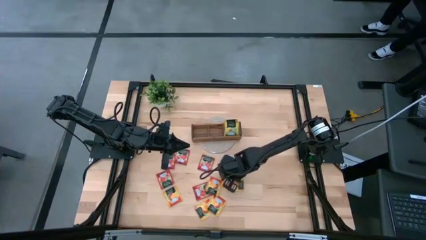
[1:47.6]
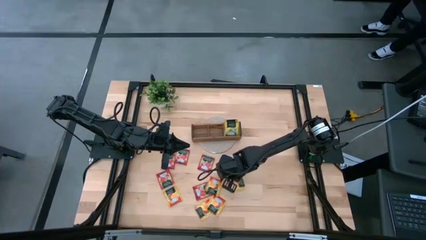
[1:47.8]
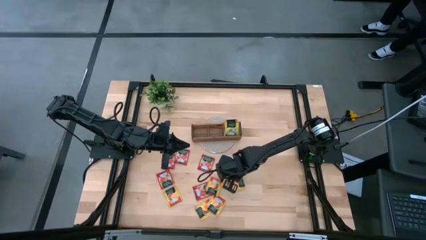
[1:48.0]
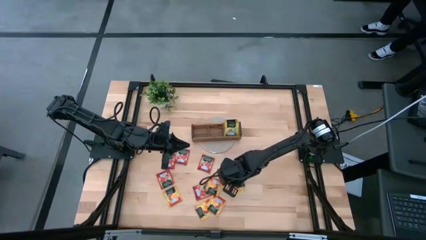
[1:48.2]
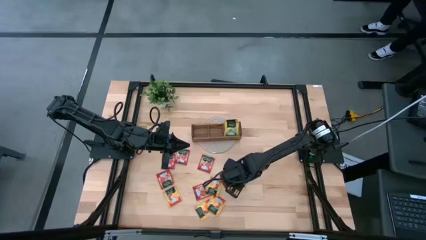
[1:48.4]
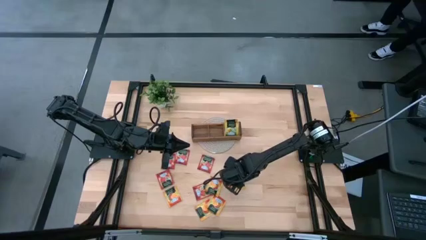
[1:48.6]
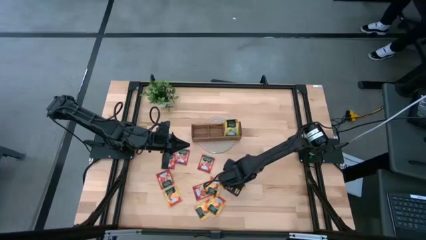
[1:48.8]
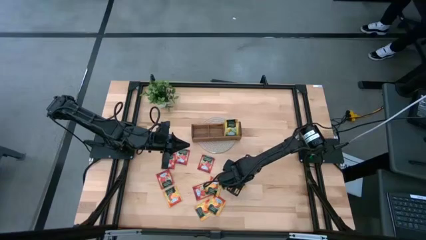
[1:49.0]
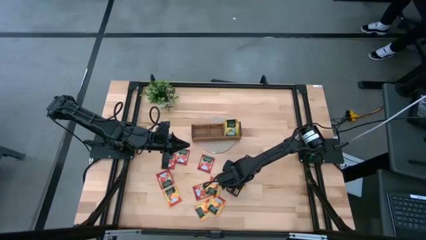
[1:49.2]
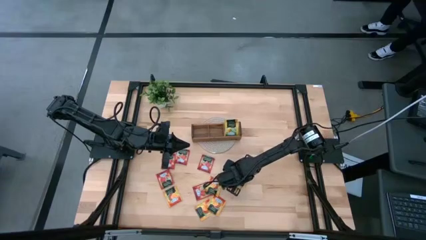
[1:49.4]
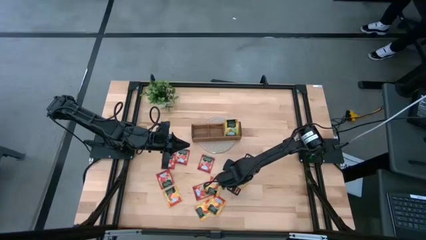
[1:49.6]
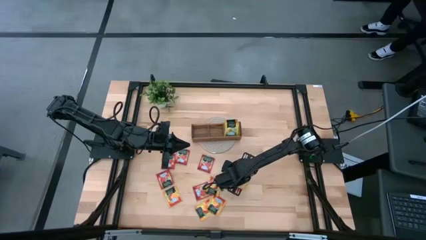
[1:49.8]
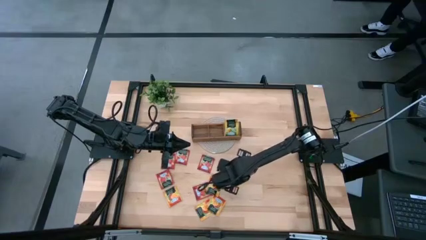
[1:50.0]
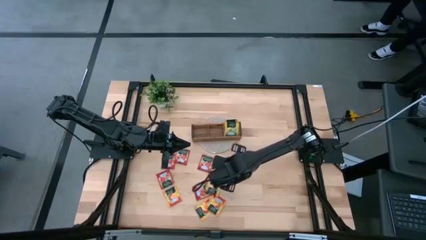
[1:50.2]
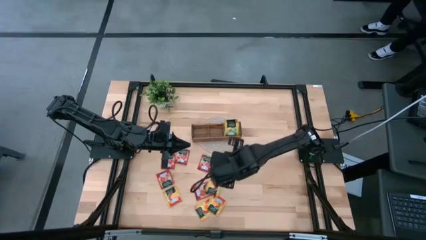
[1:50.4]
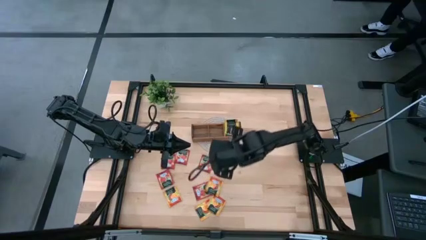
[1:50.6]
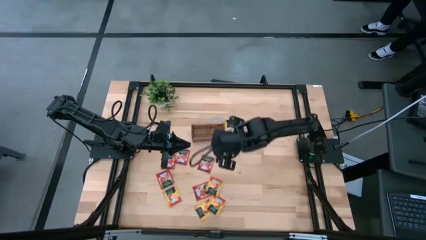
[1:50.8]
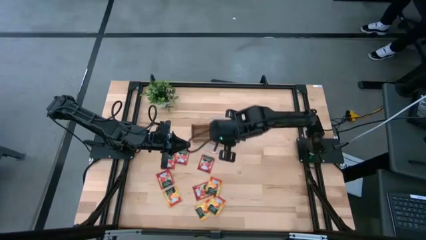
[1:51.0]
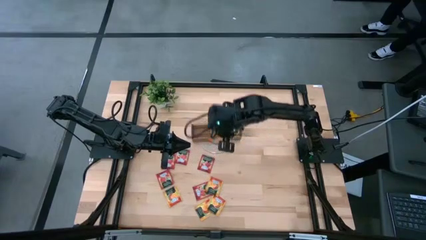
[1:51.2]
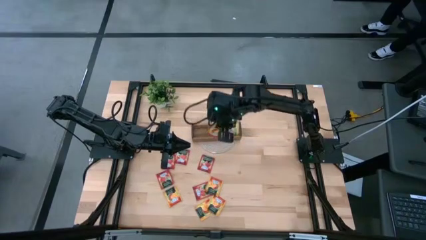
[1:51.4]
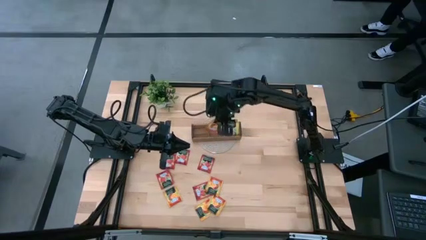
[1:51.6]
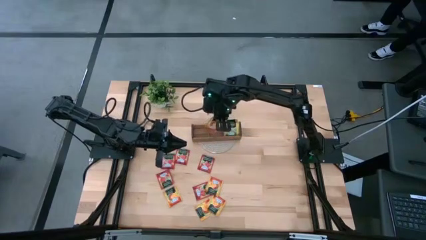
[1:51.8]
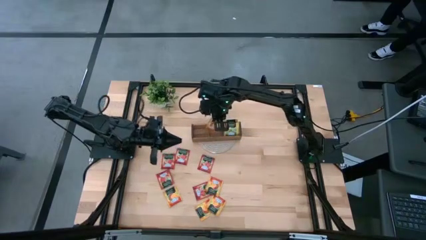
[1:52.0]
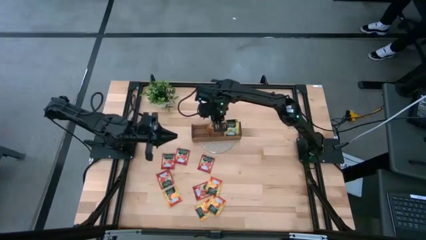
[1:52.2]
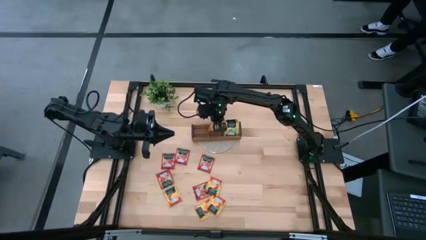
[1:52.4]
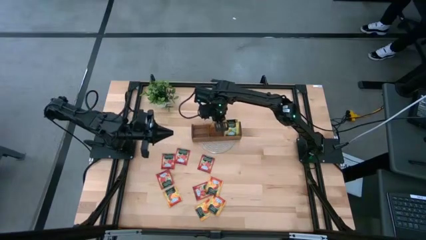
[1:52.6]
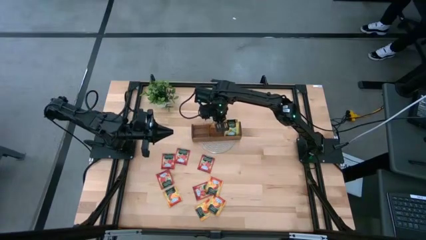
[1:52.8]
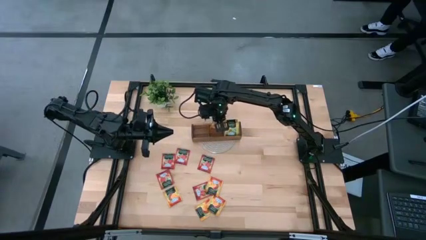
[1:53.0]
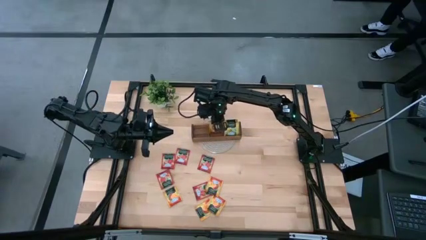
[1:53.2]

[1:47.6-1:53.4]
Task: Pick & Place Tea
Put the orange tea bag into the middle section of the wooden organizer

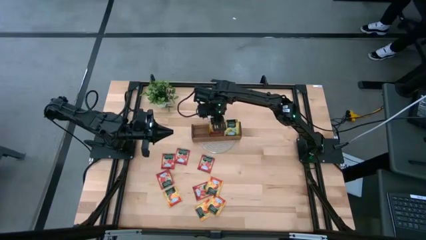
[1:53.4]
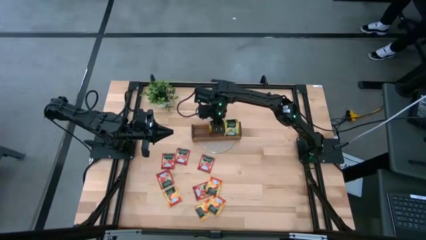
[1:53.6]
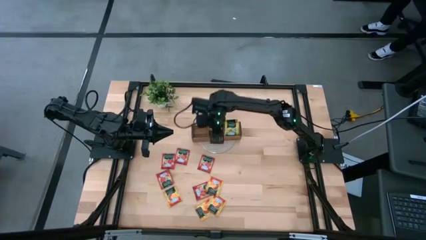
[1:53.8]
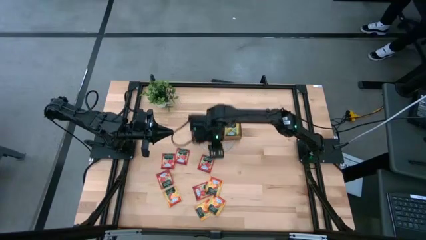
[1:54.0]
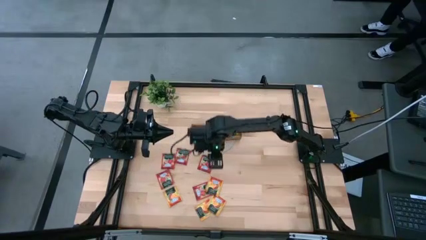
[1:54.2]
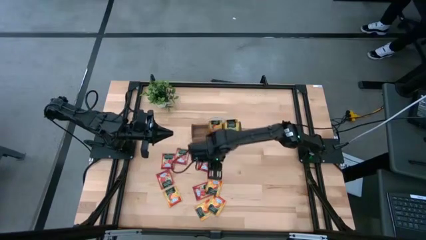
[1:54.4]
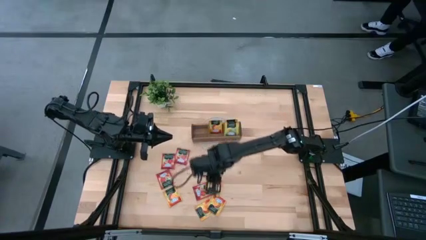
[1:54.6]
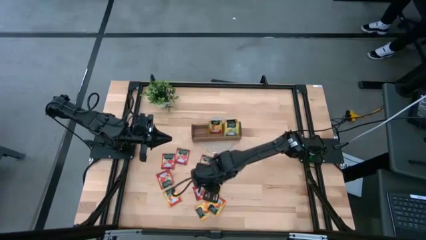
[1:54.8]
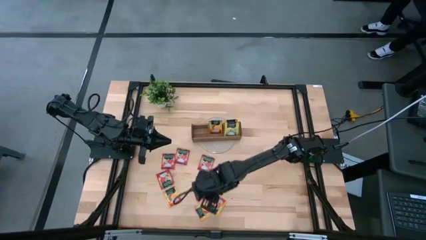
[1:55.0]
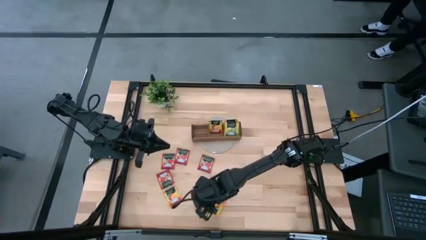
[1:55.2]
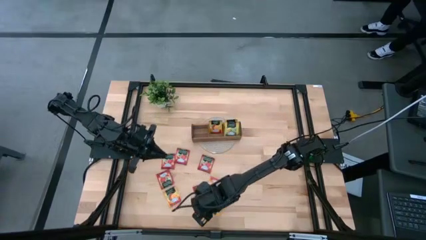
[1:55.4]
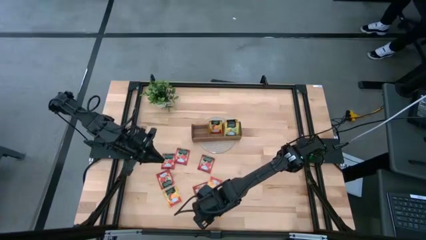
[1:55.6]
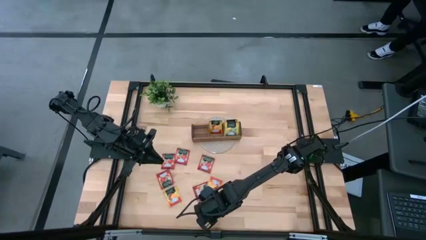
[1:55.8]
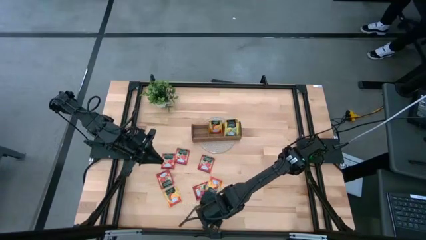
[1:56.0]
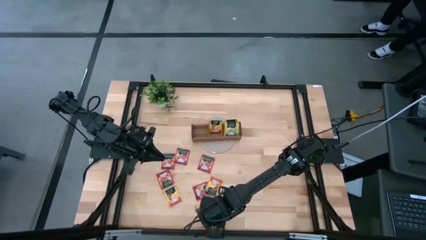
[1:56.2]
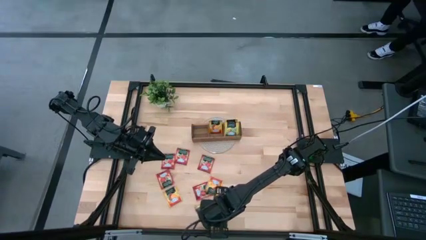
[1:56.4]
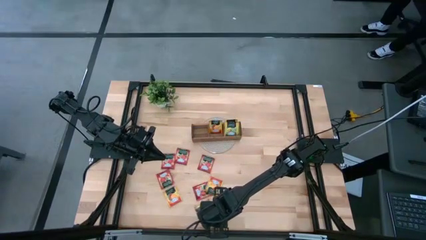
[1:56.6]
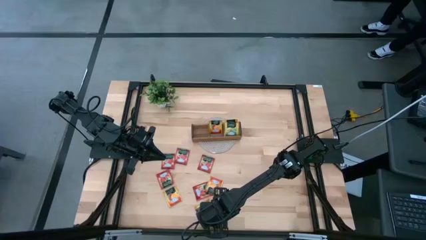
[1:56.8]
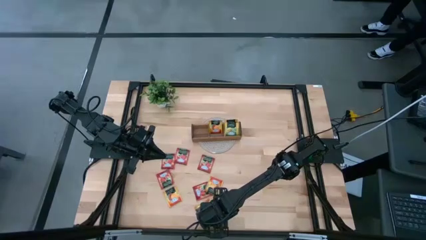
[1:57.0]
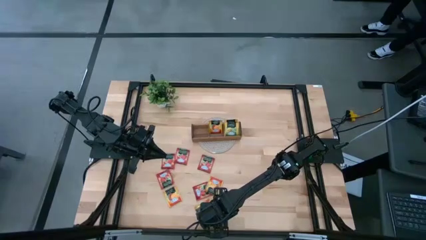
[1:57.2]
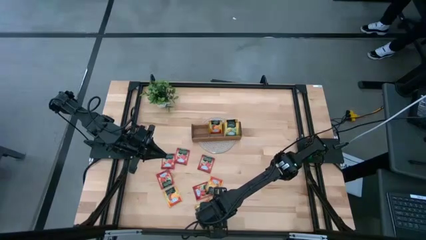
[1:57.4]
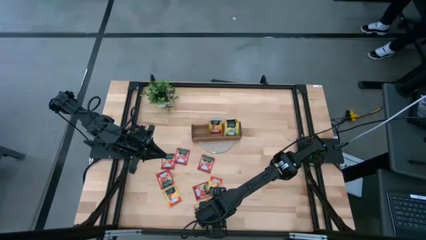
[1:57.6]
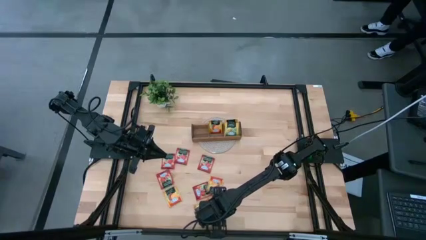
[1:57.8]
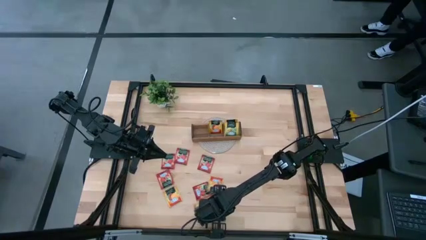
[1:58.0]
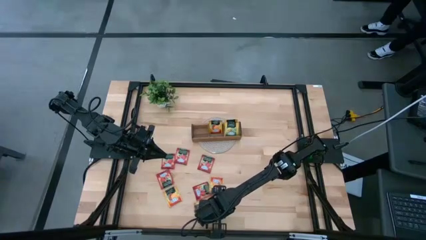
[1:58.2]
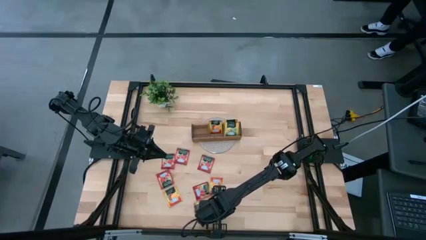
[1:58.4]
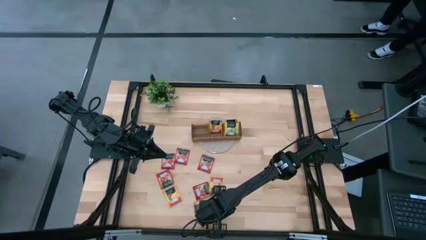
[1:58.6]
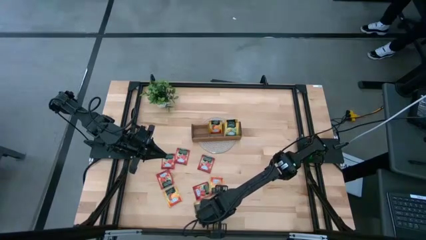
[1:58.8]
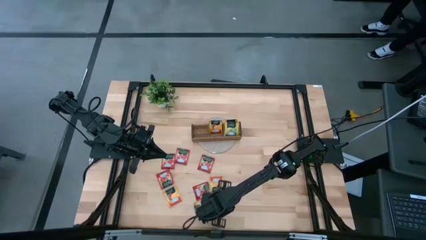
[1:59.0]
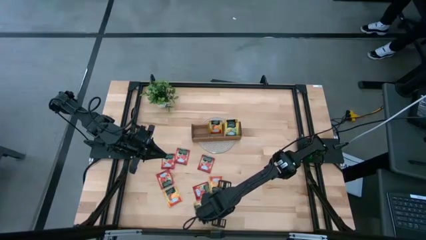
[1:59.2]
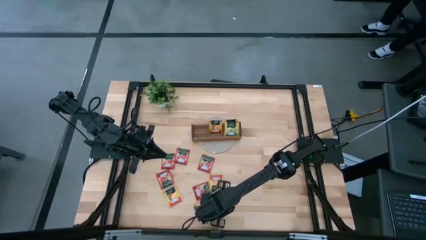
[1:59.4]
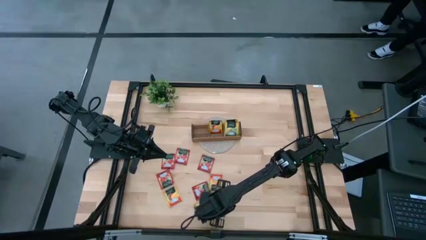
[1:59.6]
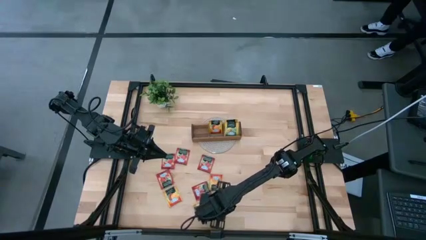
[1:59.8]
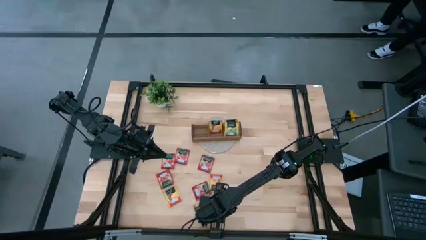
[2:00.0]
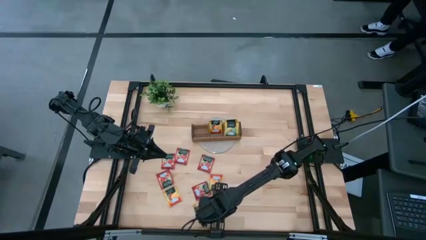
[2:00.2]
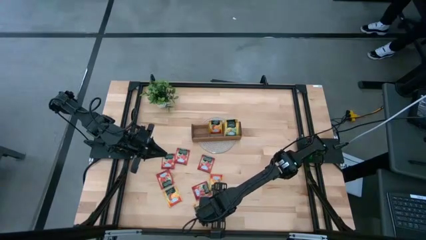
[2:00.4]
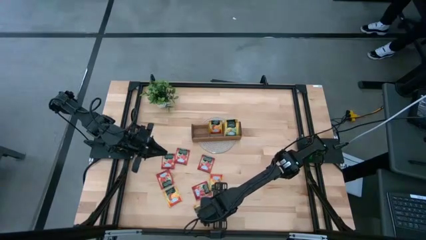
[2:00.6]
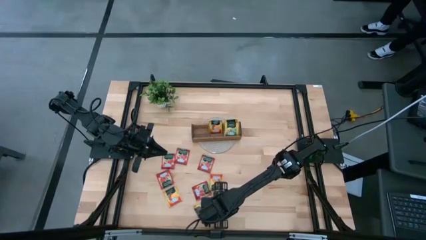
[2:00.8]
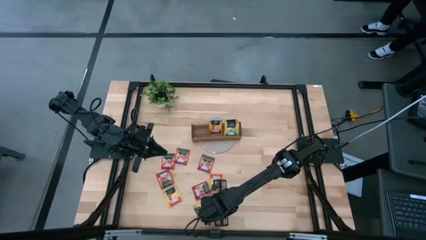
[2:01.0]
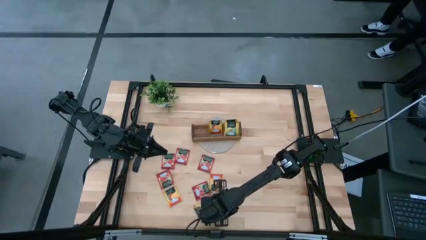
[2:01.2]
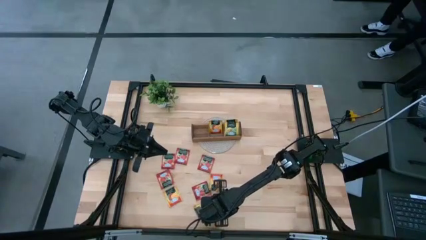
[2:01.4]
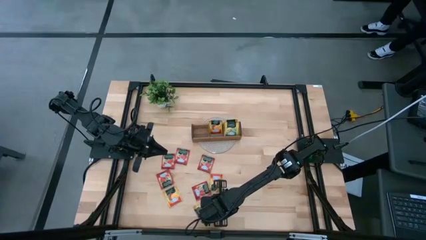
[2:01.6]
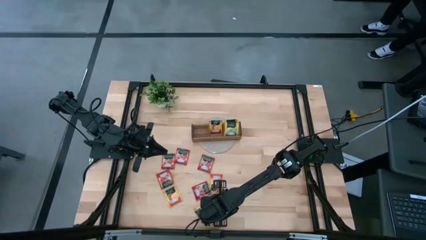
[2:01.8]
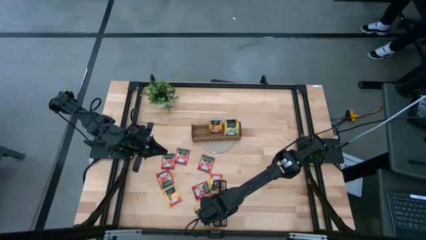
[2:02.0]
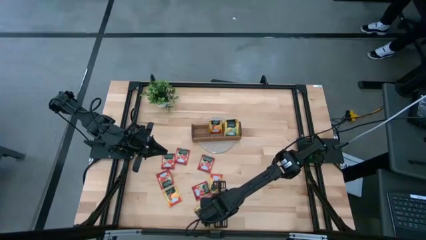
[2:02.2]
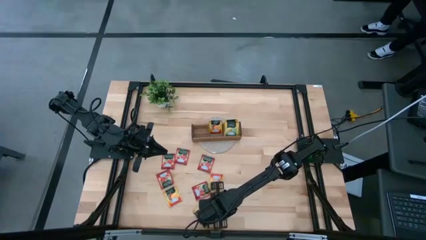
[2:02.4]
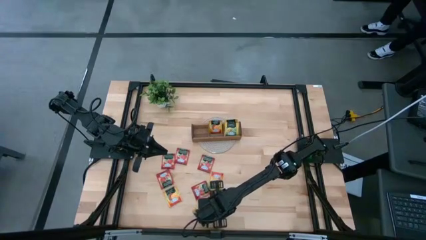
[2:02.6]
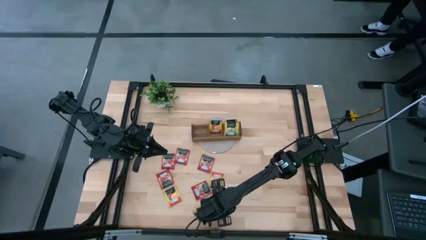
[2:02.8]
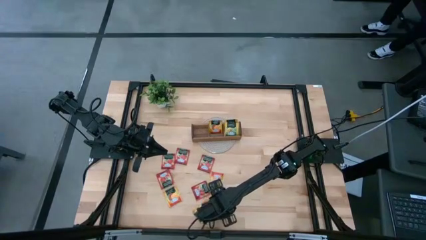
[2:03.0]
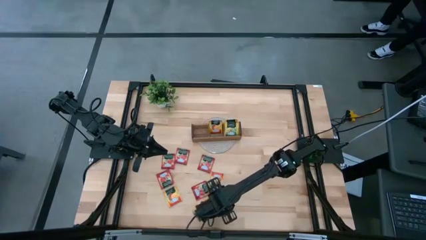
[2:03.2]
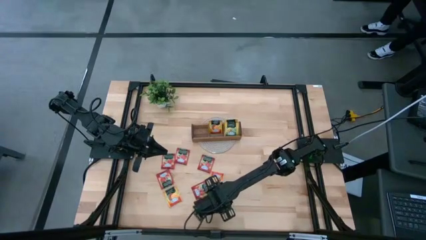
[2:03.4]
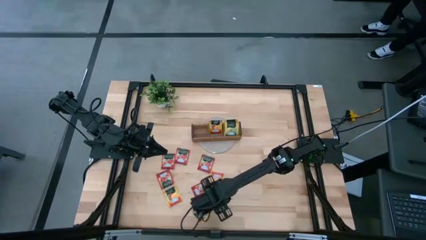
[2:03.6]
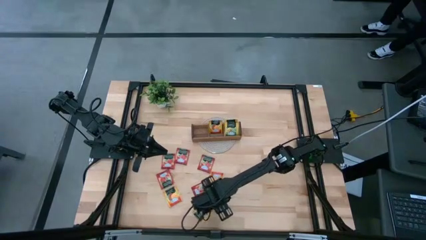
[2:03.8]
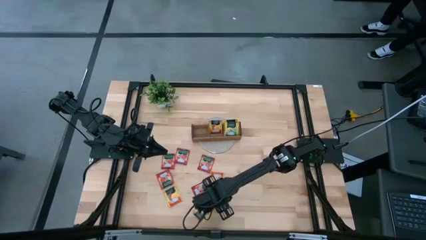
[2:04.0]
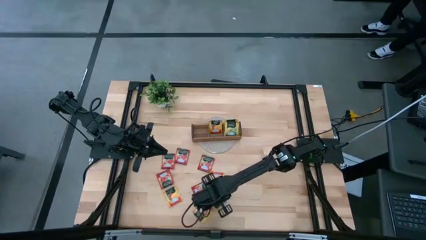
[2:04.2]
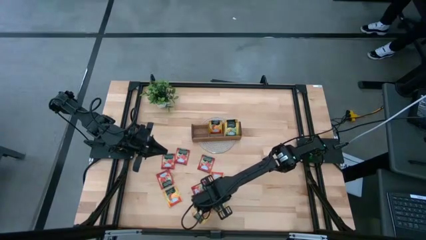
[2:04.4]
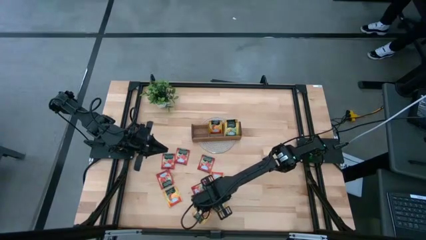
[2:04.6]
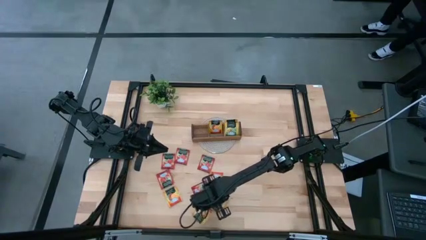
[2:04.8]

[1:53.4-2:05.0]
Put the orange tea bag into the middle section of the wooden organizer
